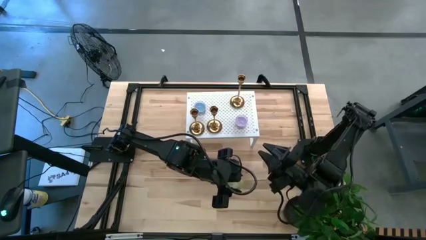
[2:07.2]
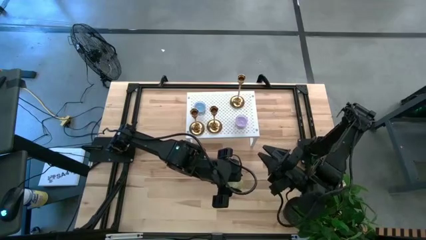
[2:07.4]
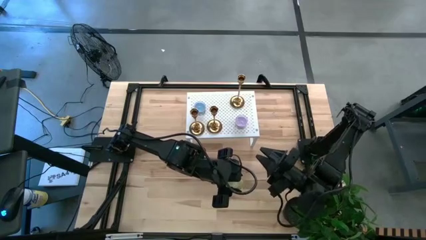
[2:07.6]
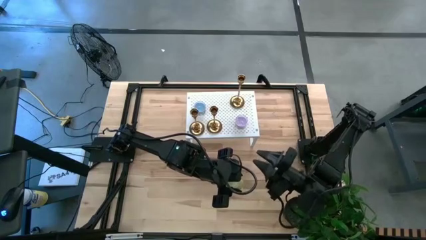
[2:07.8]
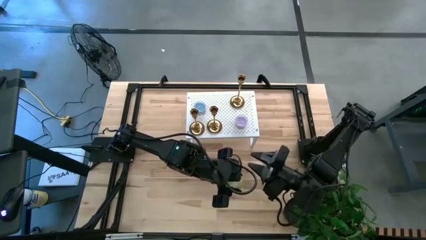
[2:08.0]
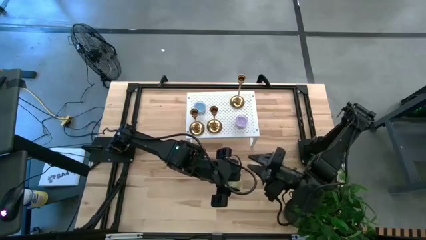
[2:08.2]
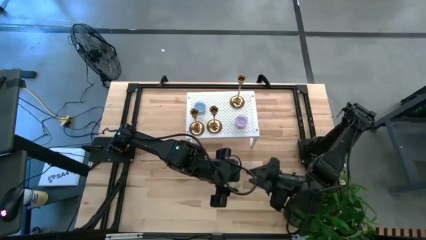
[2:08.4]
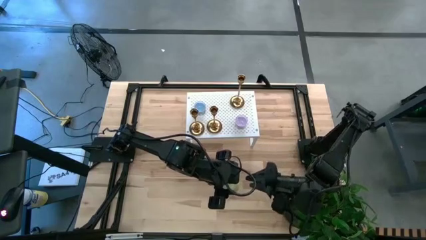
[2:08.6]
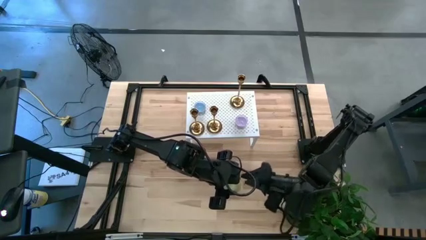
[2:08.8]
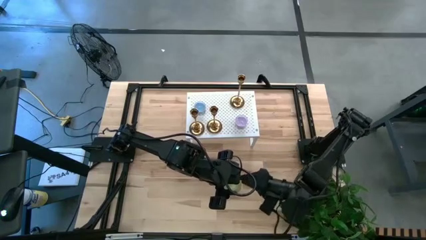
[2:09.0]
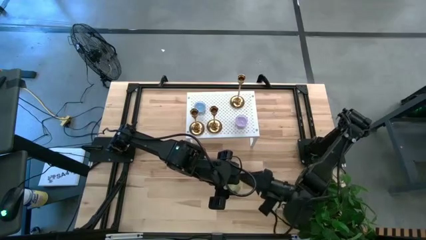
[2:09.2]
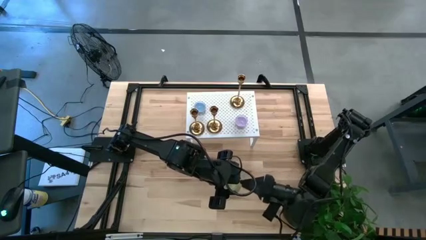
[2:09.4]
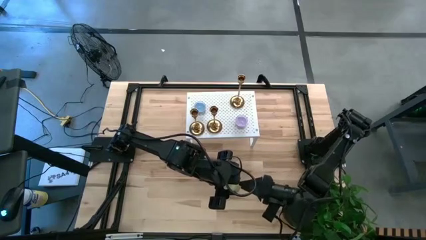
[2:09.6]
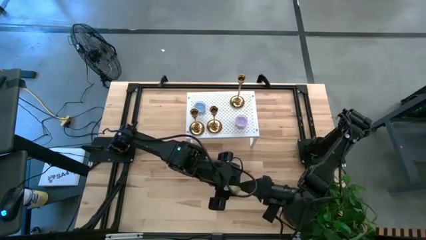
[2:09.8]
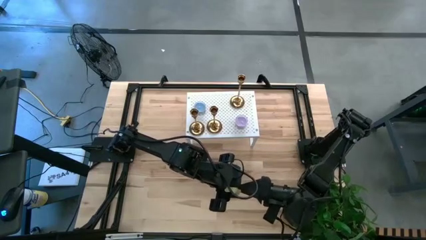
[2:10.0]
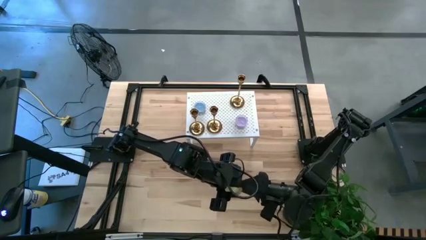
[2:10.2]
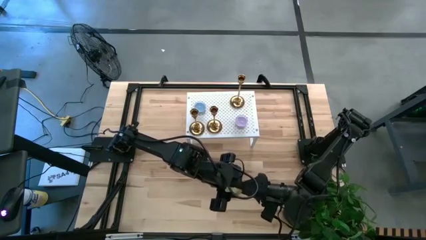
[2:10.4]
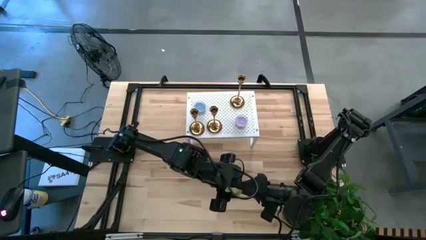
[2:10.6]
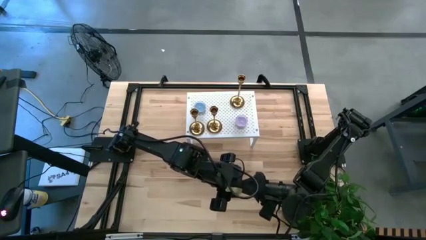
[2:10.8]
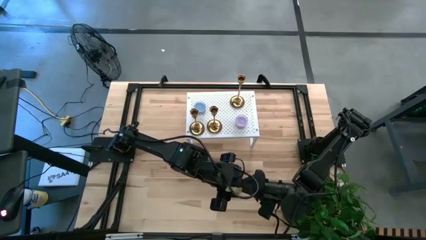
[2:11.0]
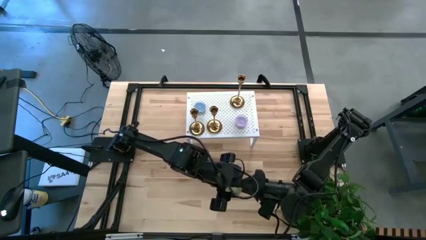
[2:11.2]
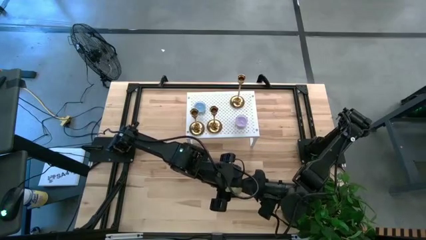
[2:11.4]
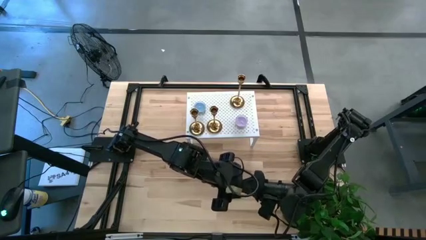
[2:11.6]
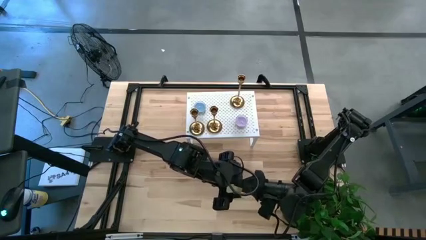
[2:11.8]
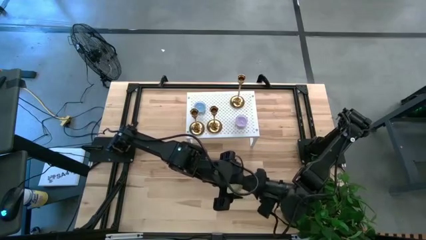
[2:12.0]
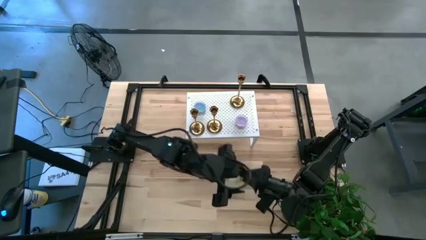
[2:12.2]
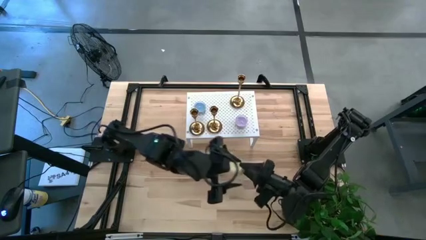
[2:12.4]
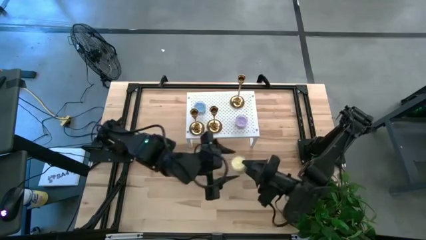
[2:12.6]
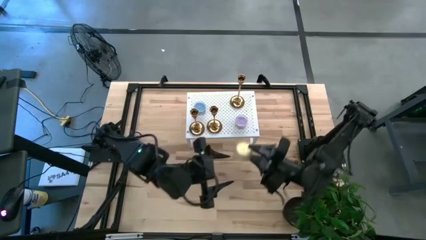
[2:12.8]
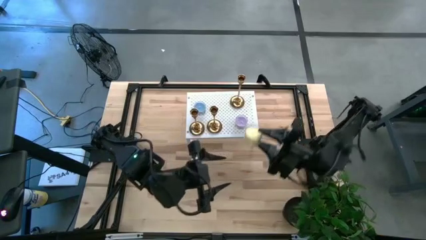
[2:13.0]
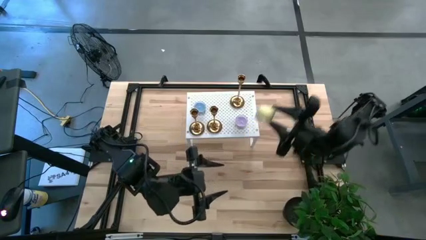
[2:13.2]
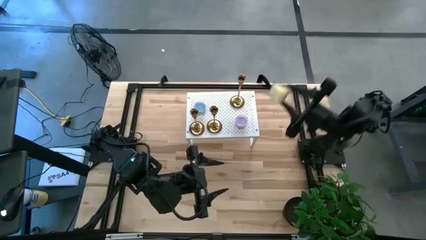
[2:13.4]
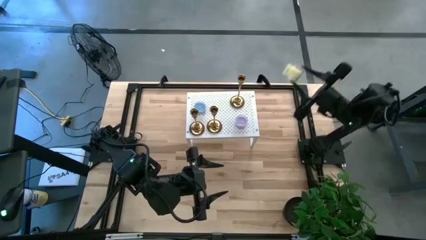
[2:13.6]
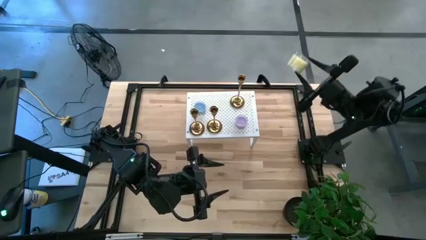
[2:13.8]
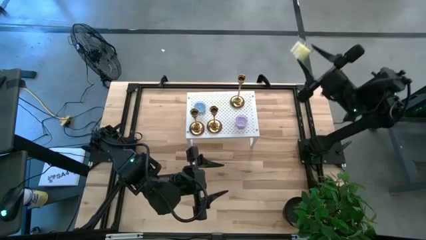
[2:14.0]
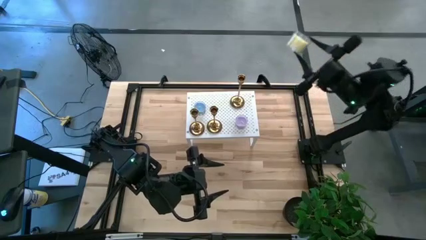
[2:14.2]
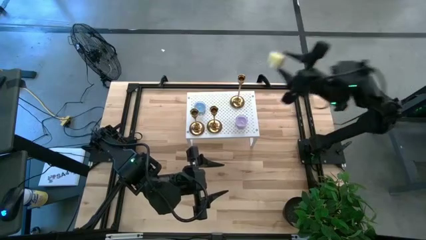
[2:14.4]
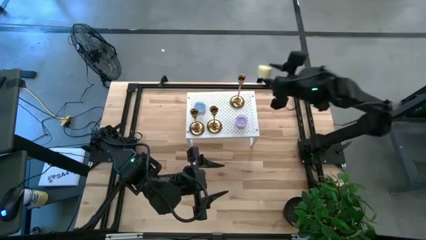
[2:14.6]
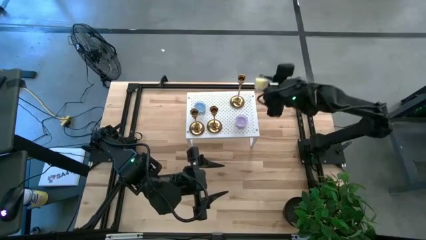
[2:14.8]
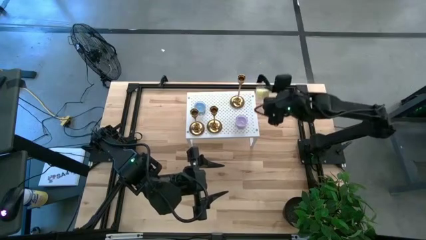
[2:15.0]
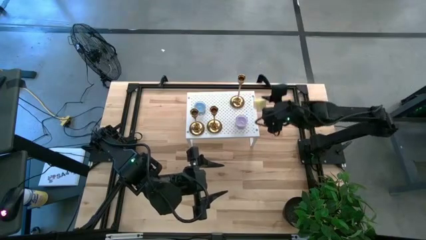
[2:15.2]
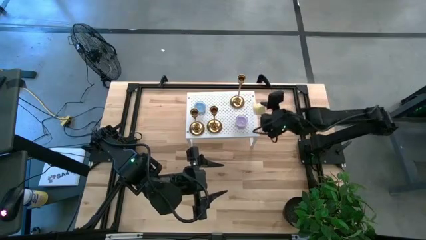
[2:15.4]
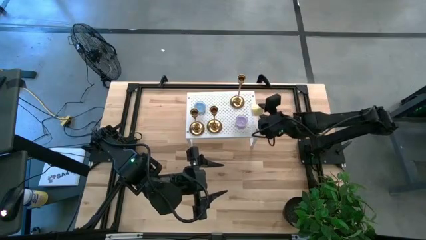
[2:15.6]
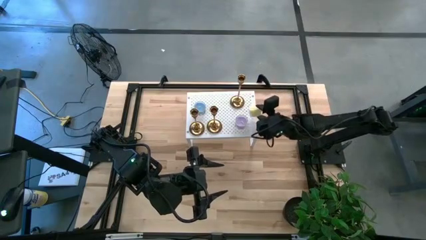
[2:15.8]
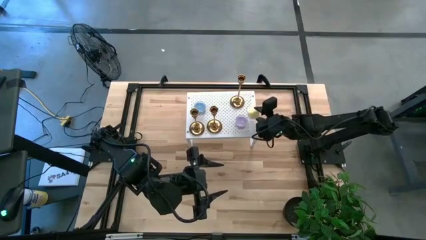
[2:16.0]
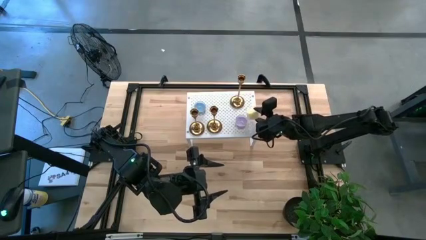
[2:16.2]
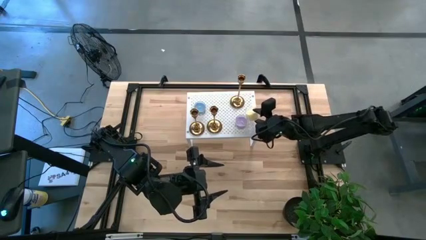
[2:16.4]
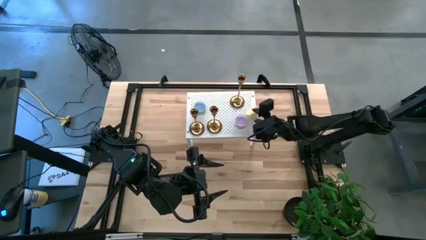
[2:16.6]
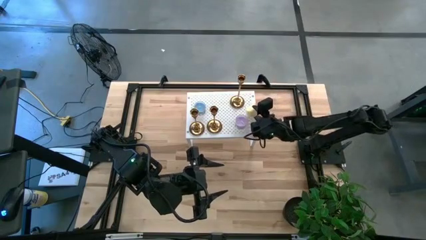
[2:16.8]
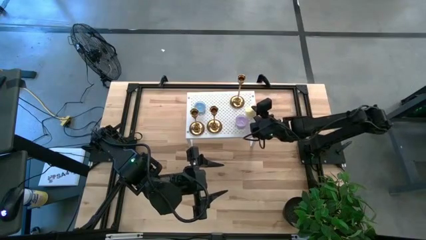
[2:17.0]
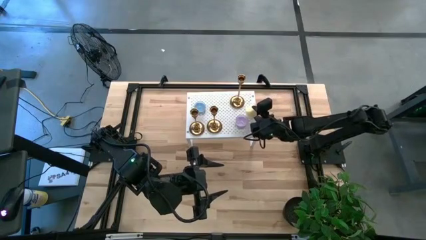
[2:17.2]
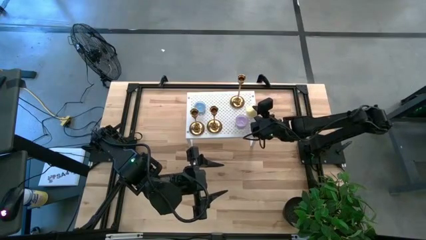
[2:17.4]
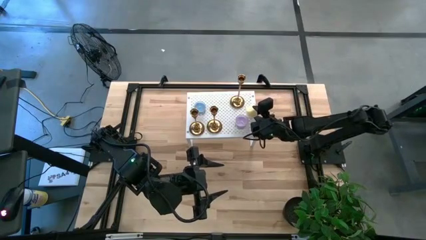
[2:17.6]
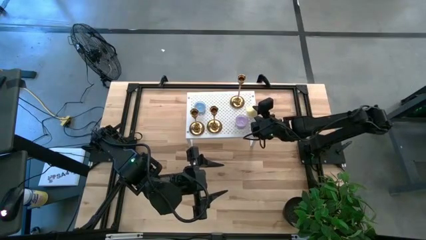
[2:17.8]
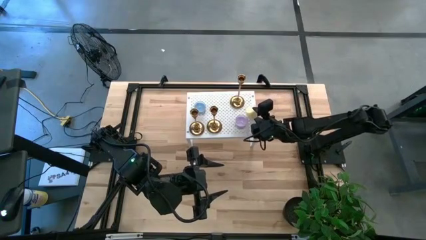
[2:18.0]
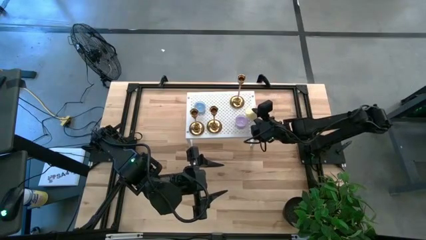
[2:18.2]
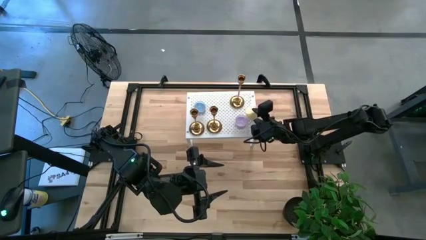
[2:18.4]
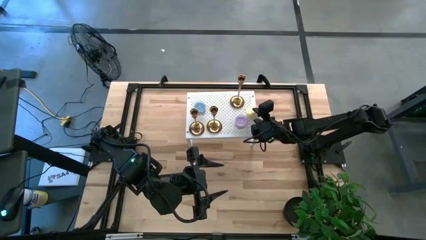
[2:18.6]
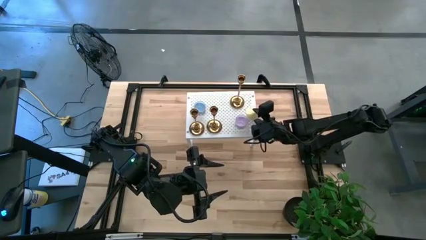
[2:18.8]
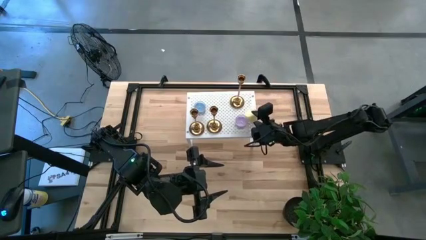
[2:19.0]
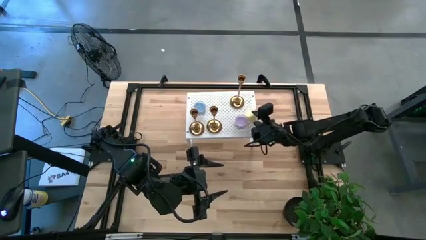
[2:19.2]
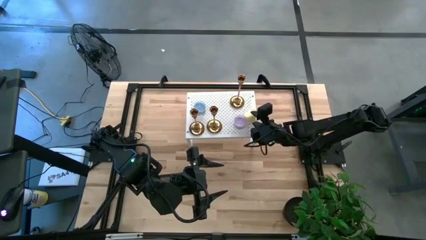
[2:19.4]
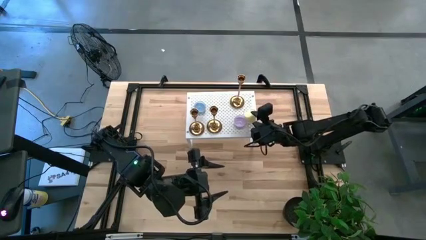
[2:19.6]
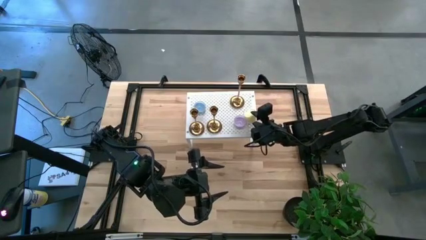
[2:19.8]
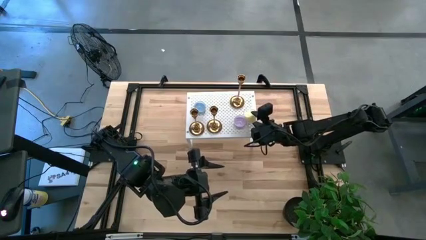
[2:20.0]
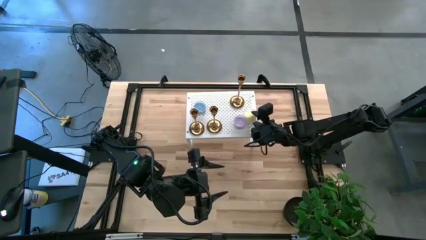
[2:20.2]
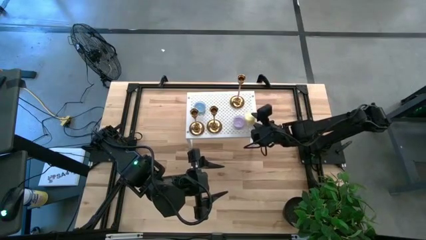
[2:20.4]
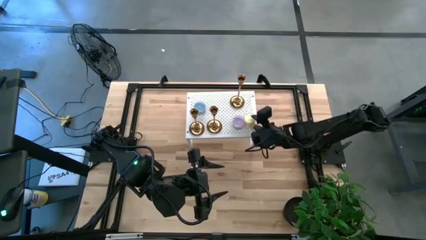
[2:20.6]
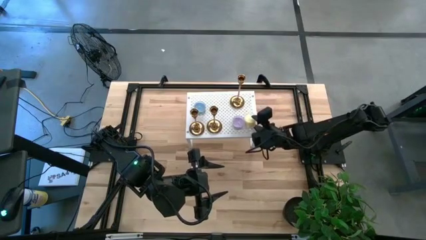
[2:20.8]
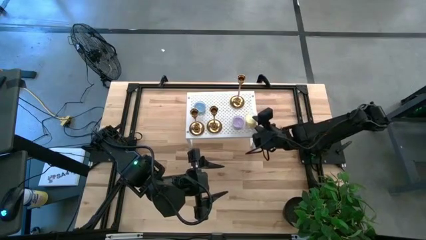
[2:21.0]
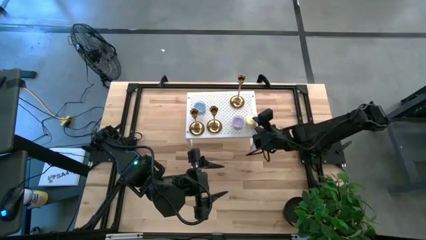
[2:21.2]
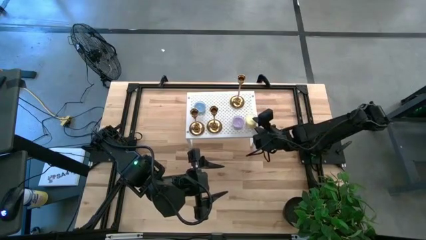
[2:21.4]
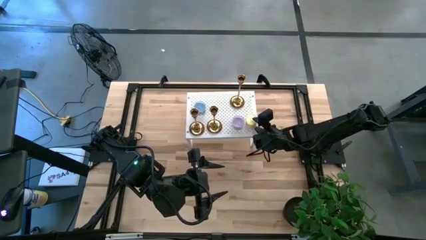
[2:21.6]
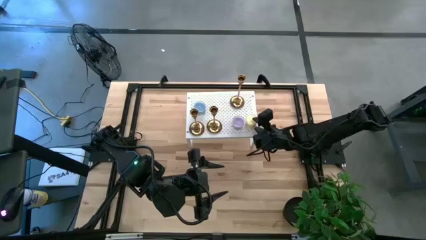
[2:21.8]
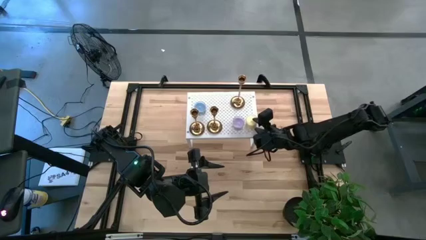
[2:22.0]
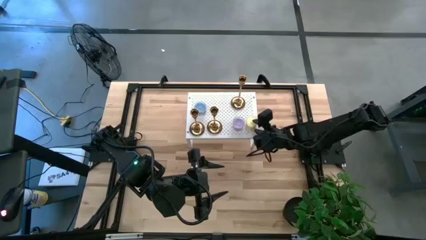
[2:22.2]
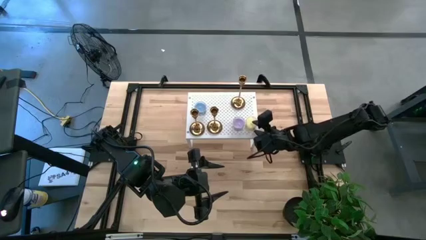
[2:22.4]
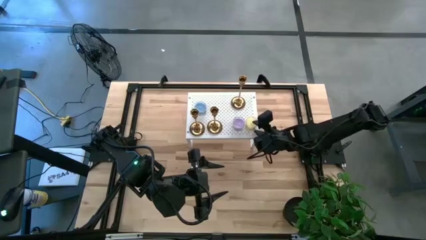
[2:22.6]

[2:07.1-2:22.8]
Task: Pick & Place candle stick holders
Put the yellow scented candle on the shelf
